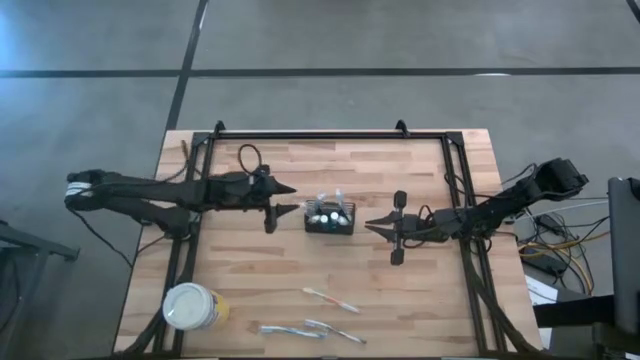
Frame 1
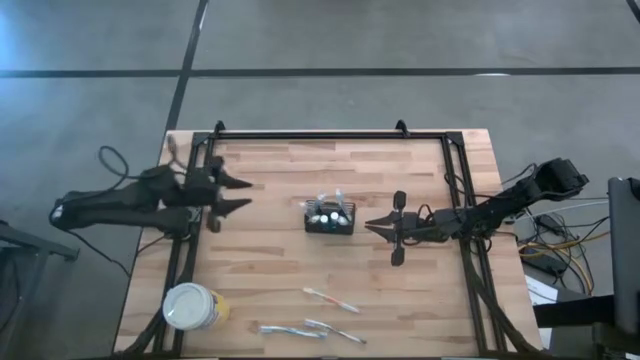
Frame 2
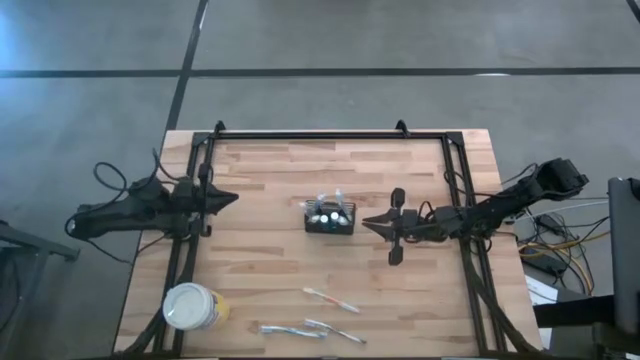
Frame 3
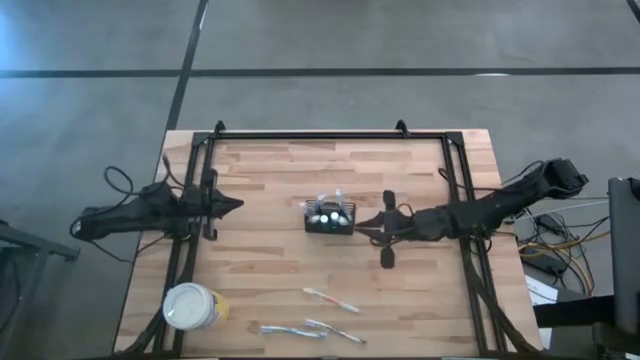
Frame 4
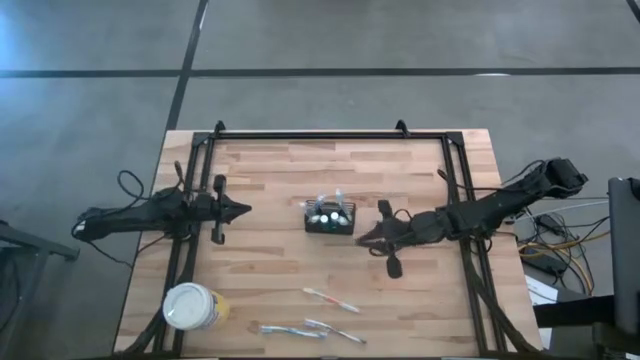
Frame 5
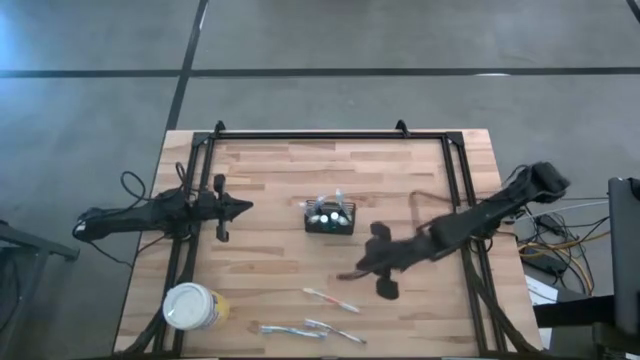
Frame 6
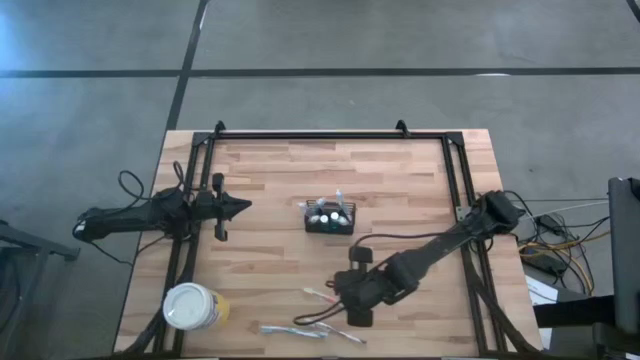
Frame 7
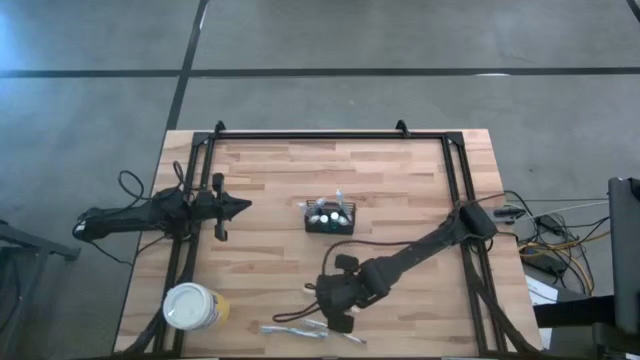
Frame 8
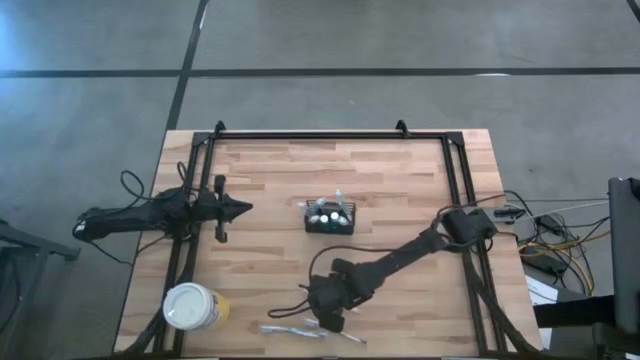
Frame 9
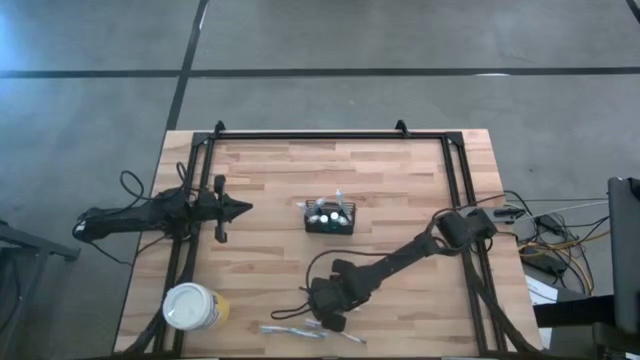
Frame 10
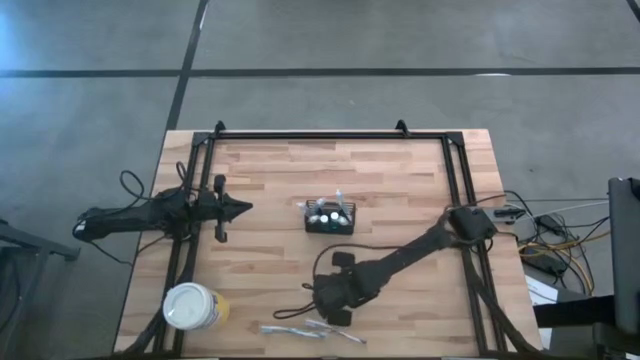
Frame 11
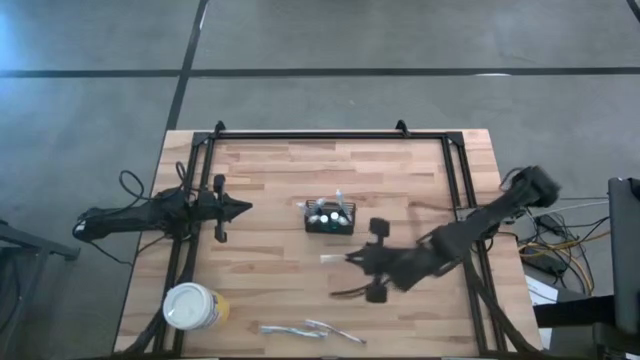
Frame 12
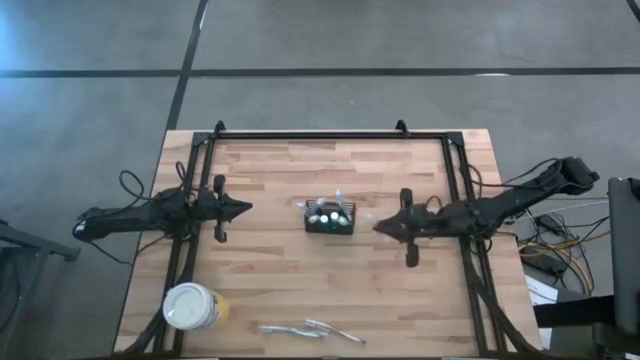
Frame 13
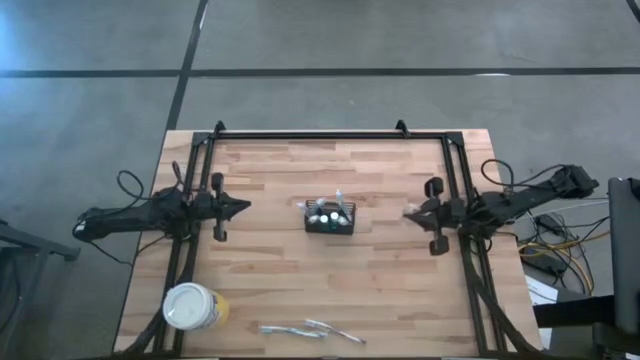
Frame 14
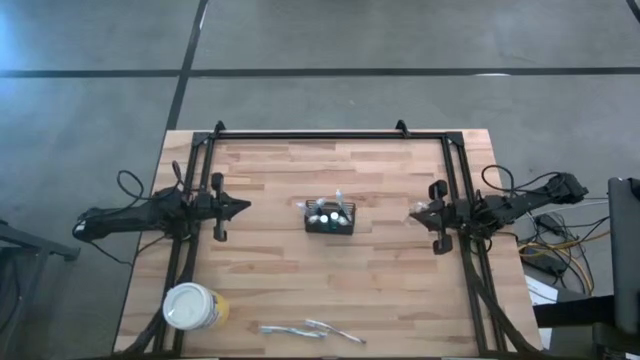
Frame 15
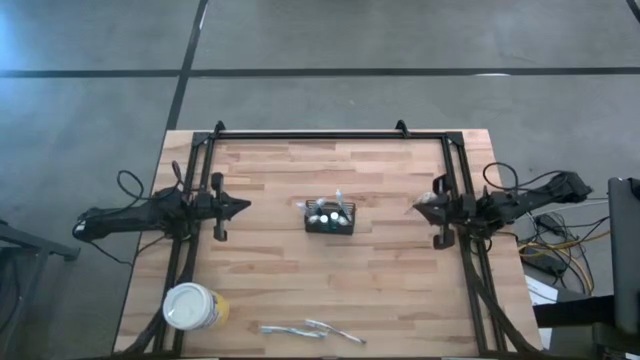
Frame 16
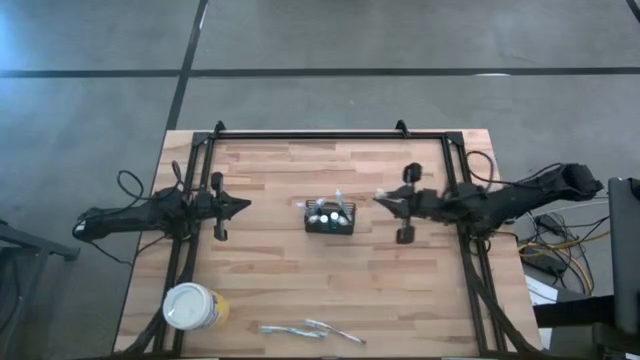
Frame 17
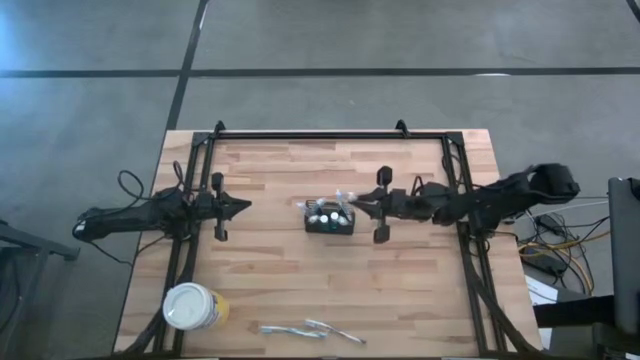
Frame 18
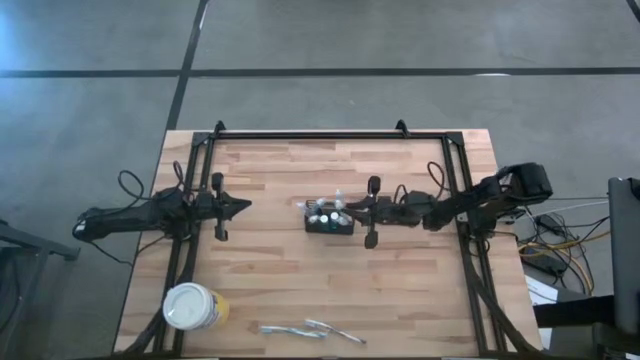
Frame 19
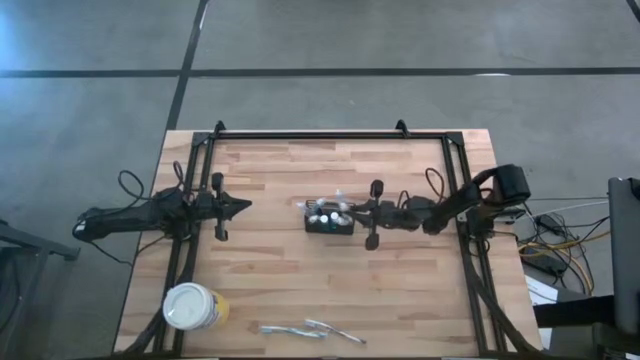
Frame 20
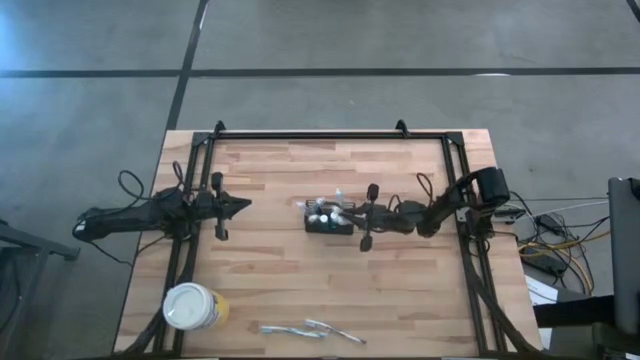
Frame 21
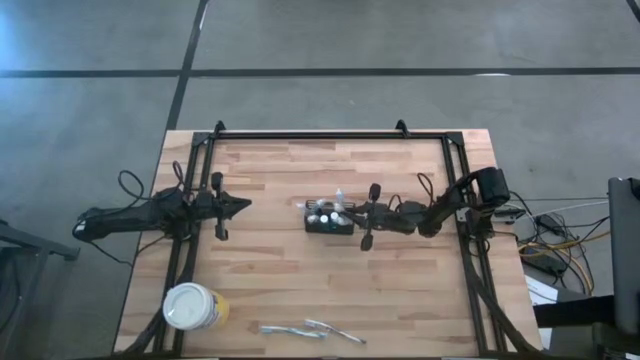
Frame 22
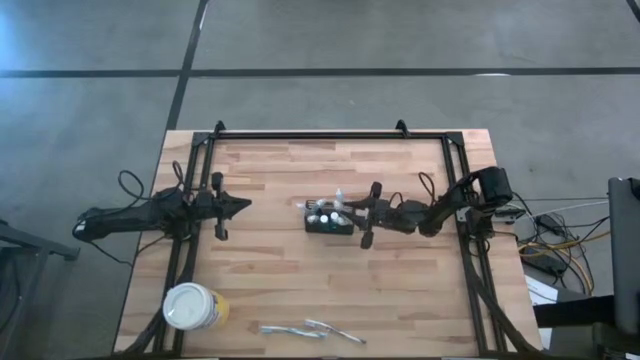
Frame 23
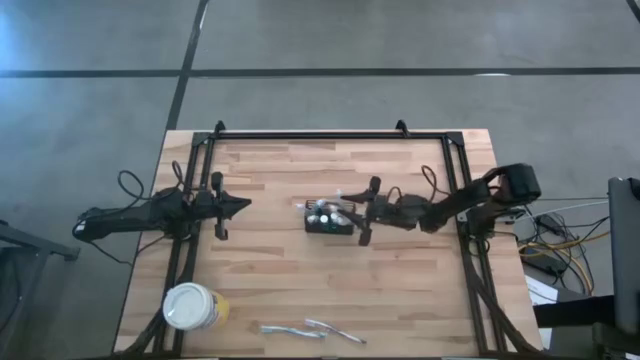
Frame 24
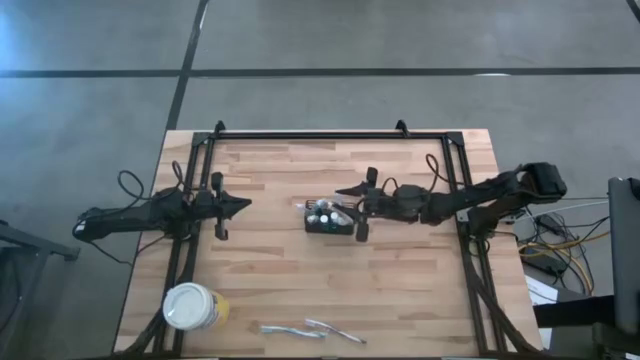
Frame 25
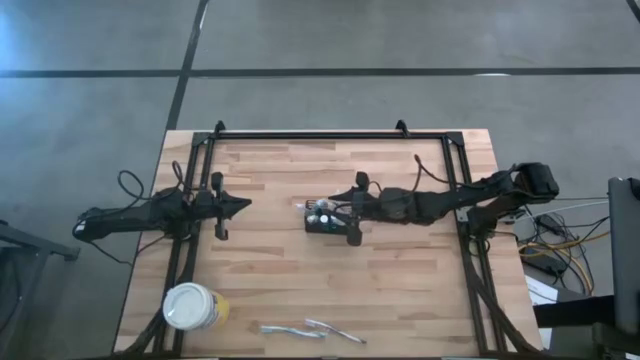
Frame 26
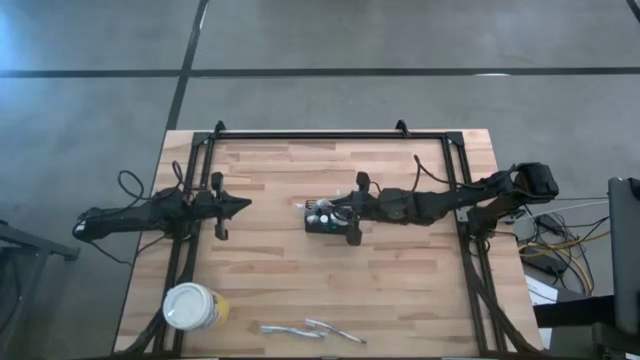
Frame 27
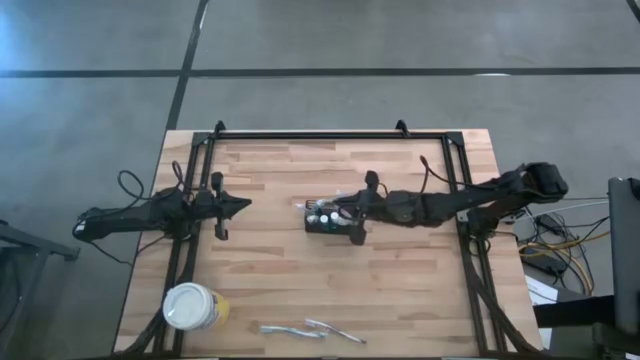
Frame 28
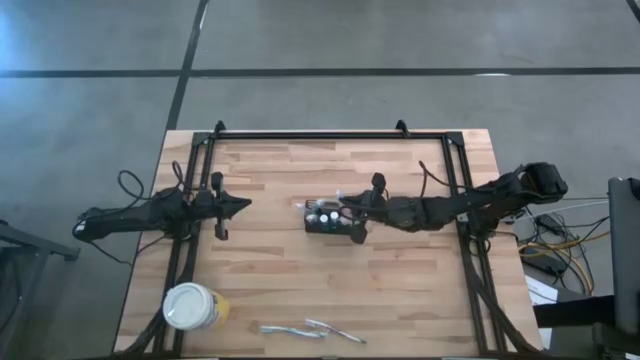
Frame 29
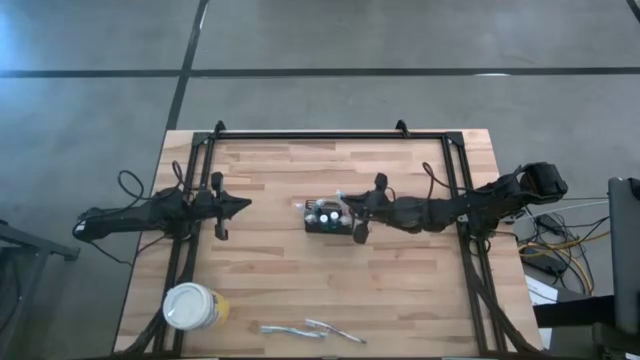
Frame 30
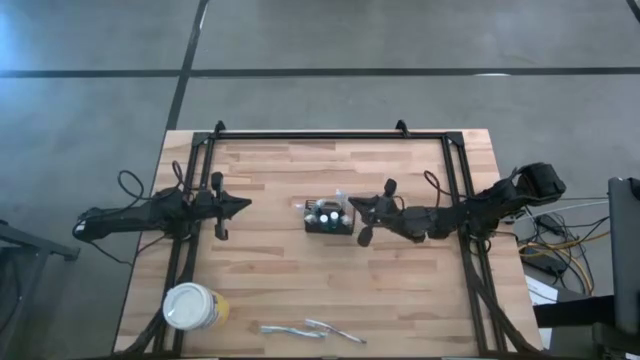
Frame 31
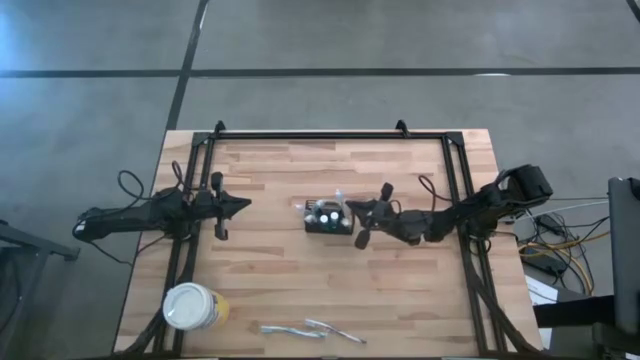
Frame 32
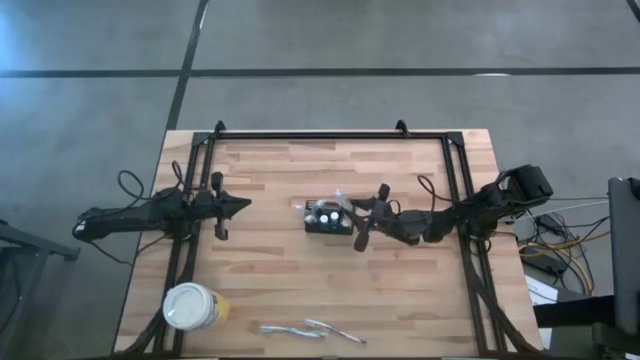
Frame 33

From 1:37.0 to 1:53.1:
Task: Pick & Place toothbrushing station
Put the orange toothbrush into the wire organizer

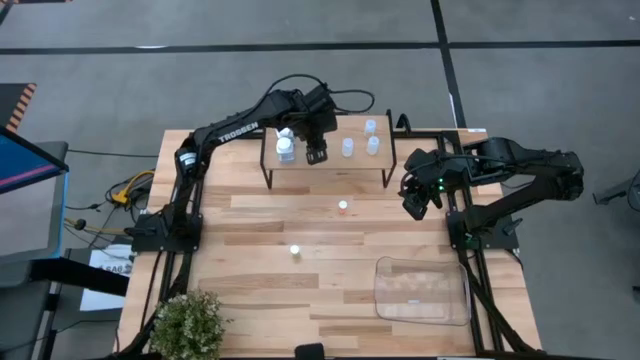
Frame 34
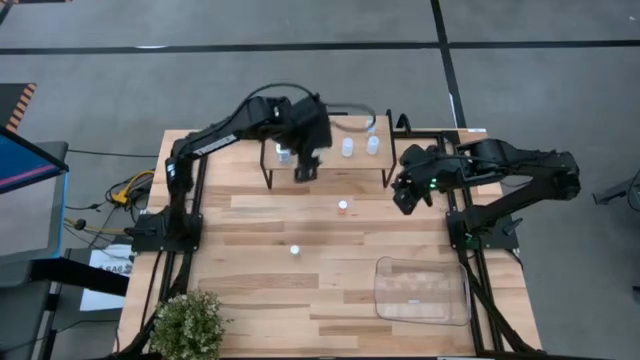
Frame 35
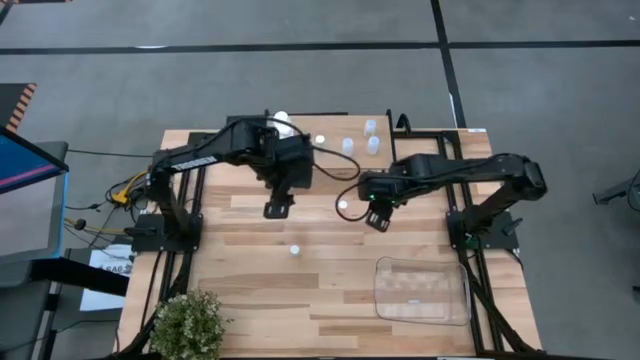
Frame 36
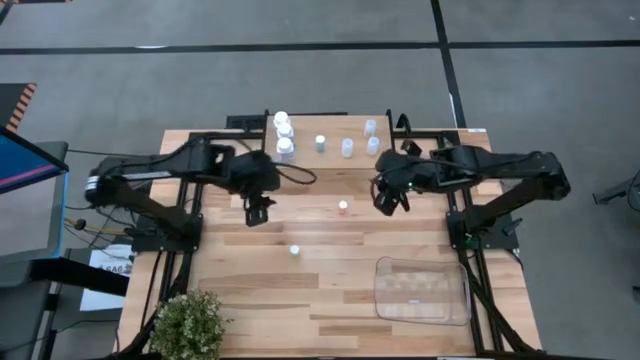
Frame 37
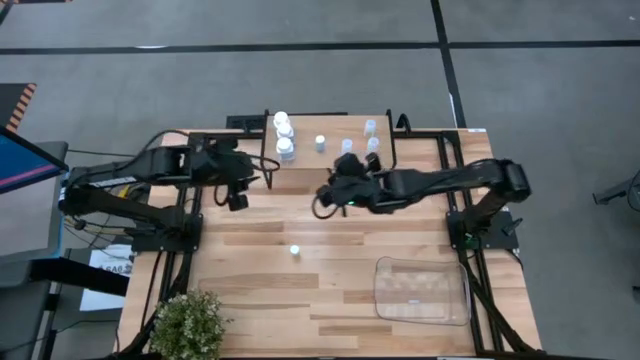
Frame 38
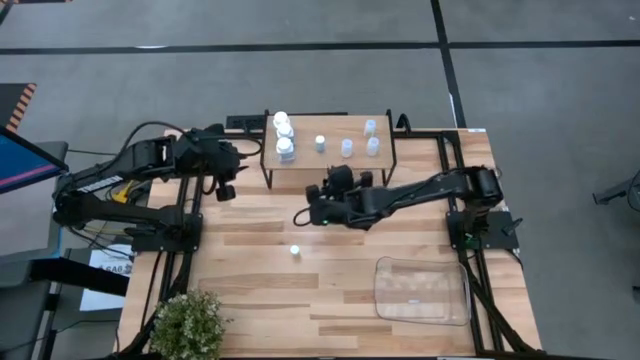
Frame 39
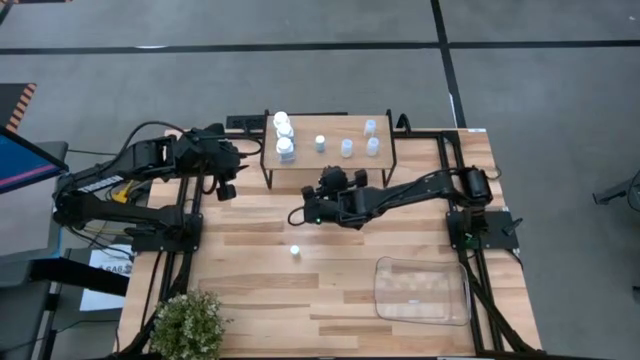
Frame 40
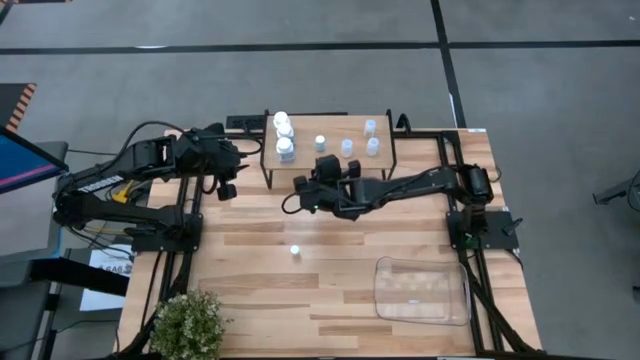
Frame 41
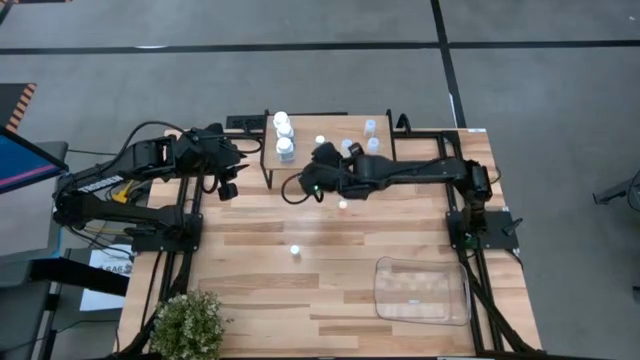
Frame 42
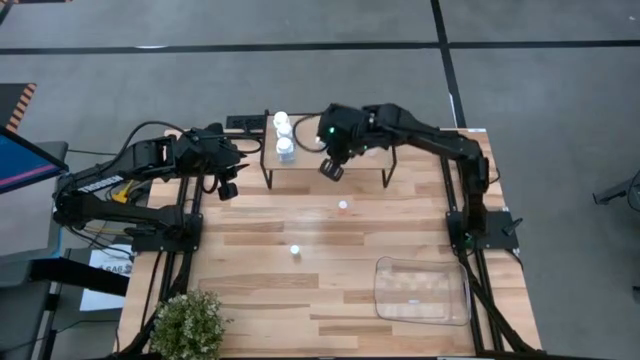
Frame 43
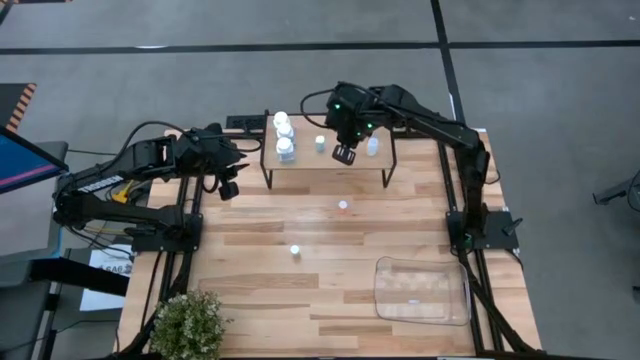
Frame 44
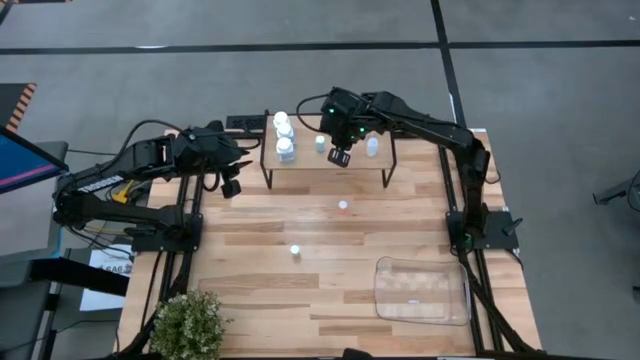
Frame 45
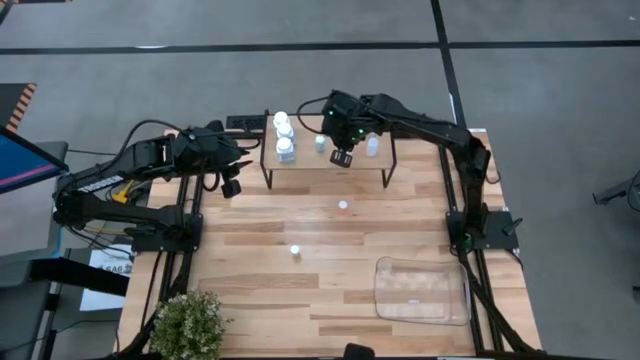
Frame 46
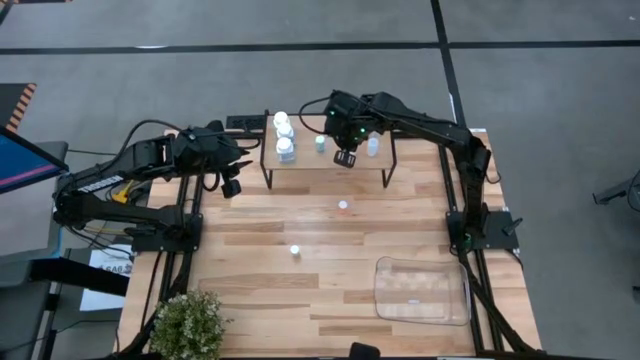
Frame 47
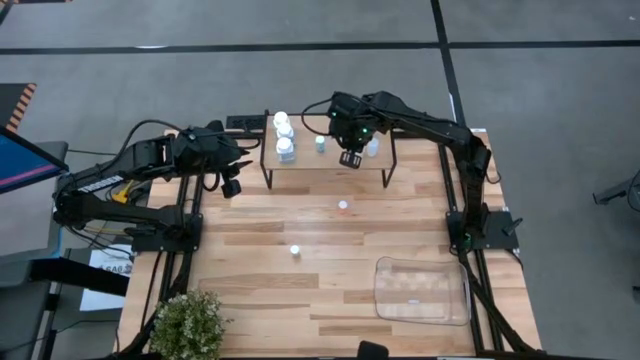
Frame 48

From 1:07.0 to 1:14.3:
Task: Pick and place medicine bottles onto shelf by color
Adjust the transparent pill bottle on the shelf
